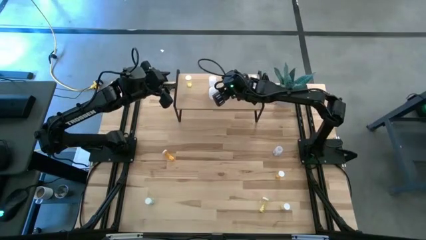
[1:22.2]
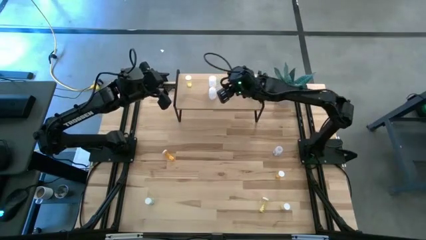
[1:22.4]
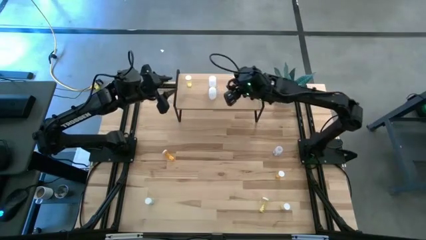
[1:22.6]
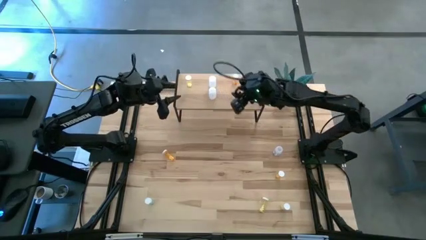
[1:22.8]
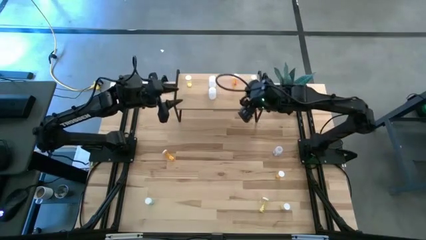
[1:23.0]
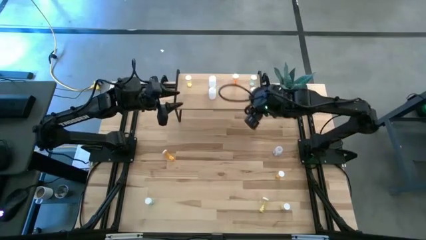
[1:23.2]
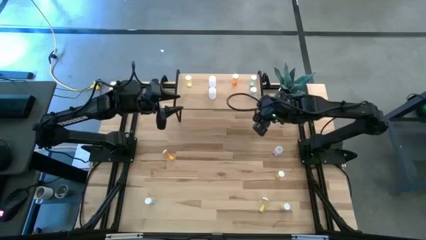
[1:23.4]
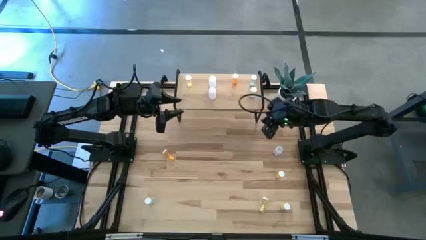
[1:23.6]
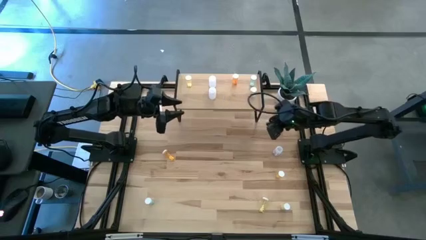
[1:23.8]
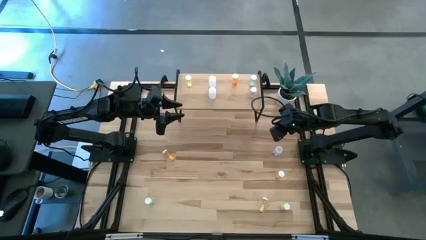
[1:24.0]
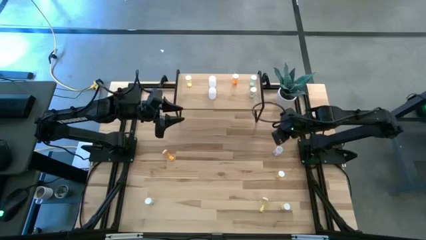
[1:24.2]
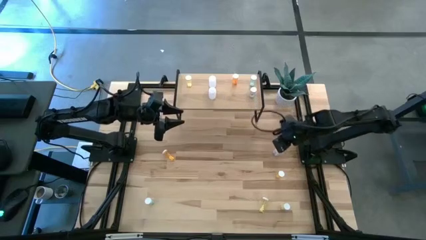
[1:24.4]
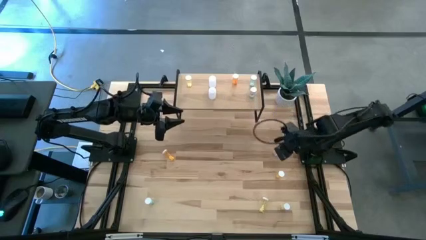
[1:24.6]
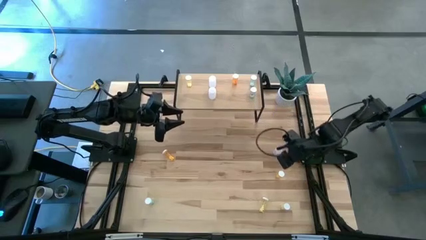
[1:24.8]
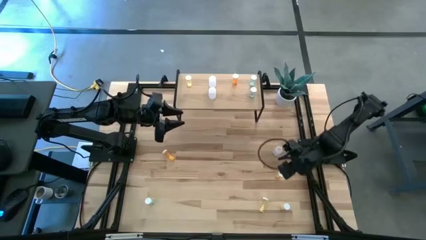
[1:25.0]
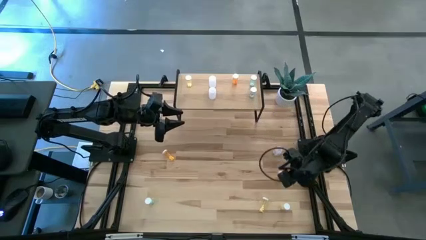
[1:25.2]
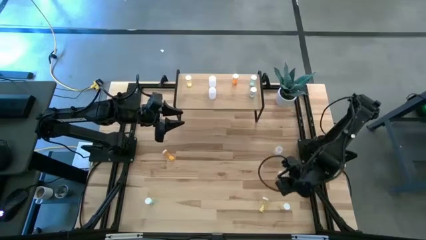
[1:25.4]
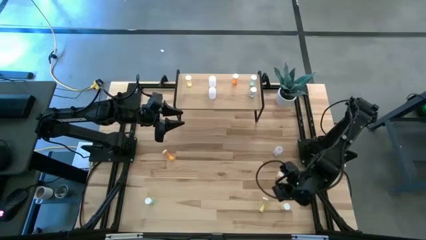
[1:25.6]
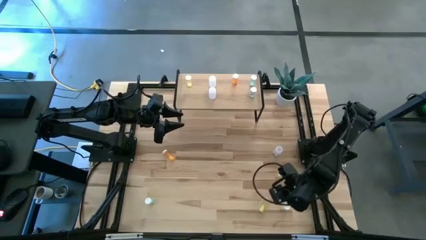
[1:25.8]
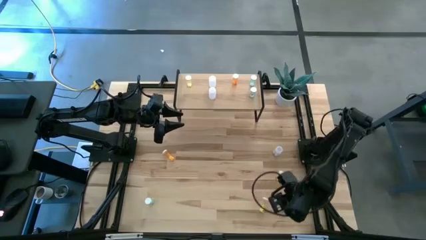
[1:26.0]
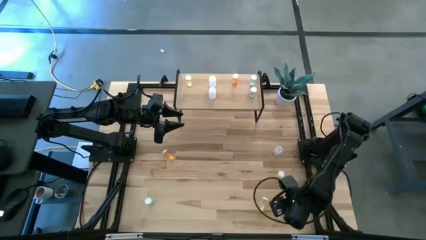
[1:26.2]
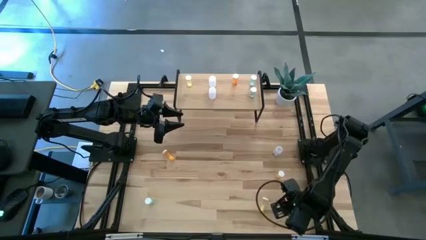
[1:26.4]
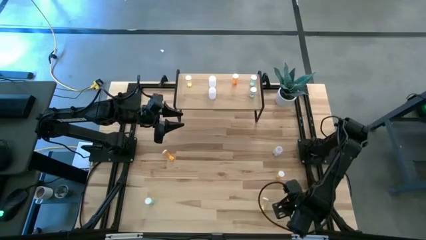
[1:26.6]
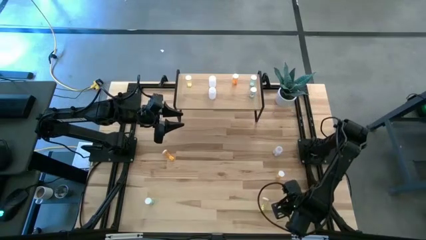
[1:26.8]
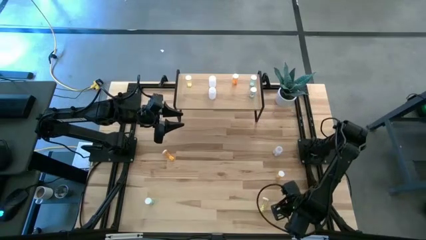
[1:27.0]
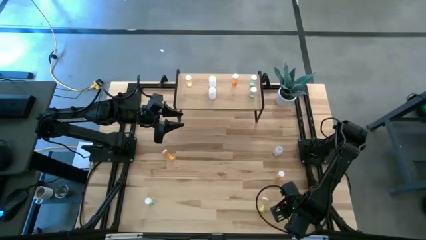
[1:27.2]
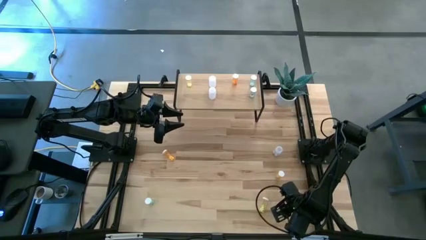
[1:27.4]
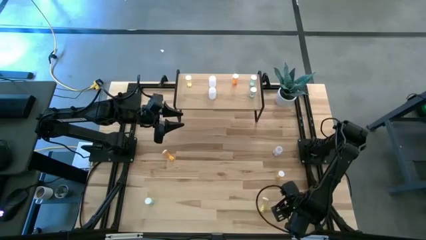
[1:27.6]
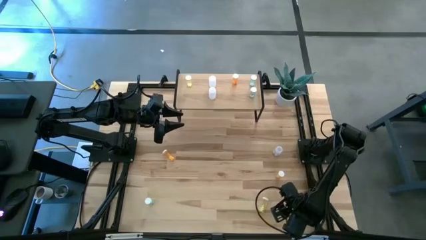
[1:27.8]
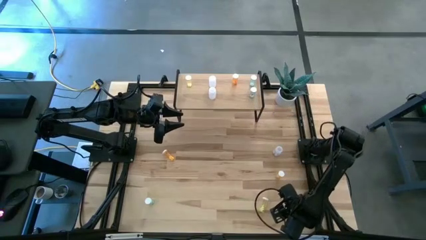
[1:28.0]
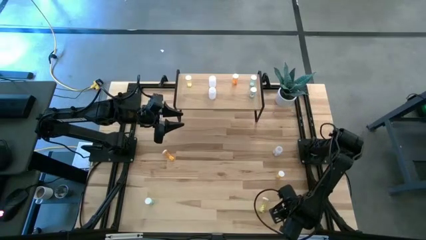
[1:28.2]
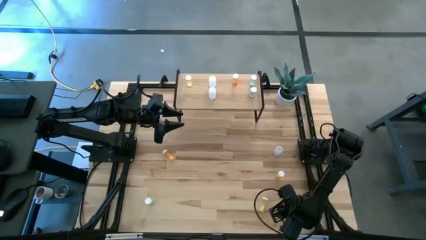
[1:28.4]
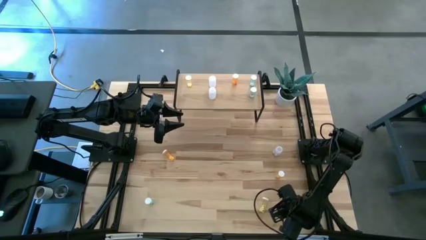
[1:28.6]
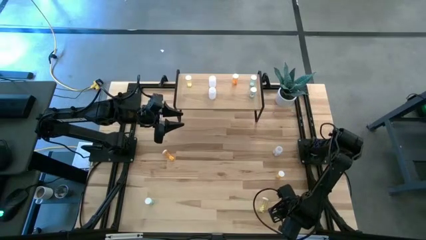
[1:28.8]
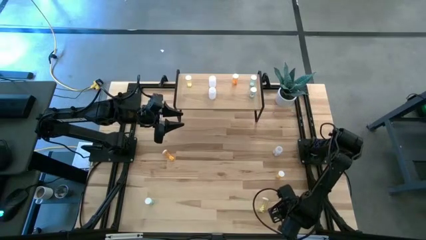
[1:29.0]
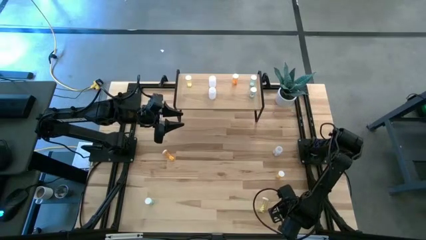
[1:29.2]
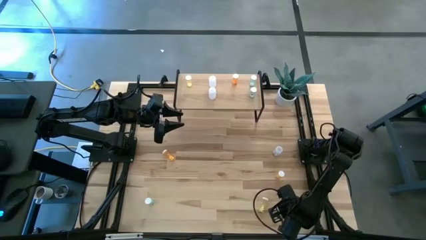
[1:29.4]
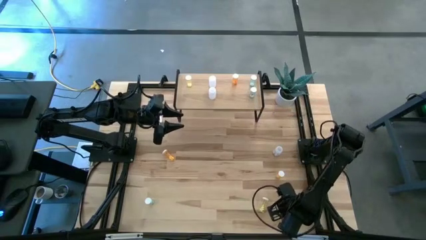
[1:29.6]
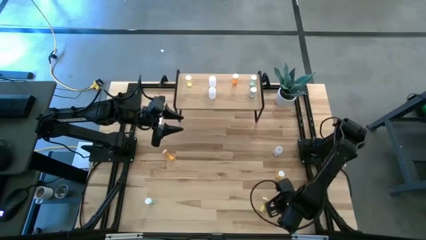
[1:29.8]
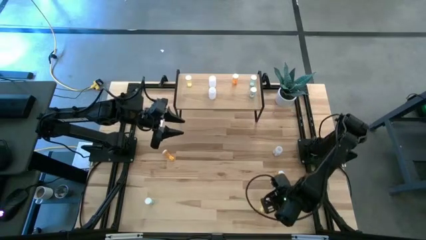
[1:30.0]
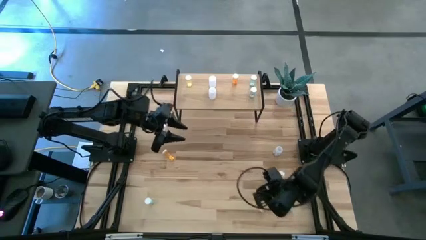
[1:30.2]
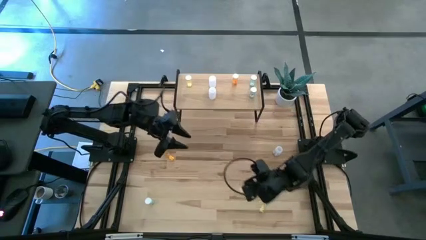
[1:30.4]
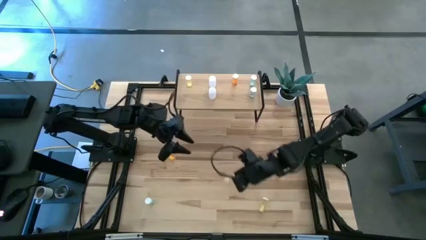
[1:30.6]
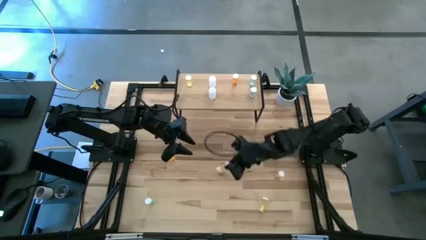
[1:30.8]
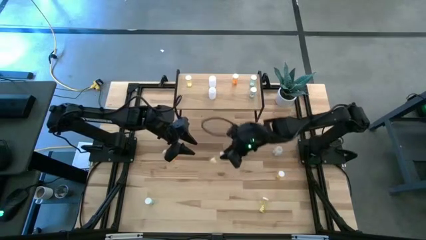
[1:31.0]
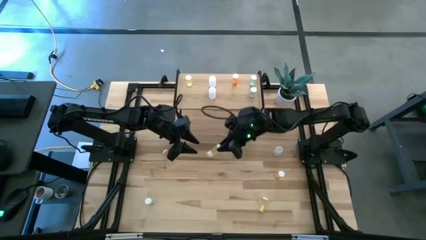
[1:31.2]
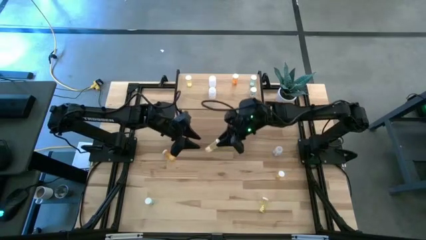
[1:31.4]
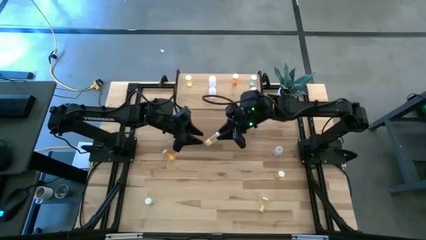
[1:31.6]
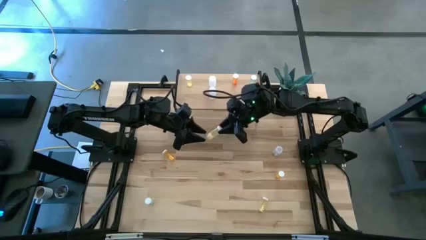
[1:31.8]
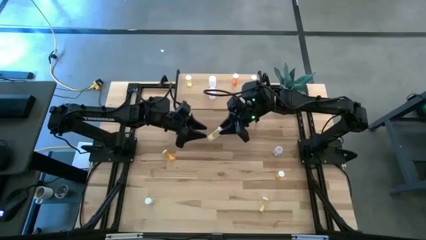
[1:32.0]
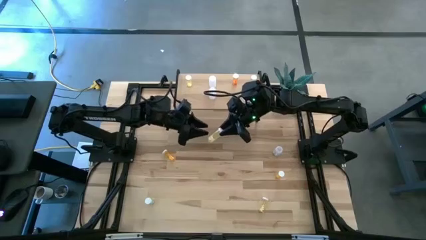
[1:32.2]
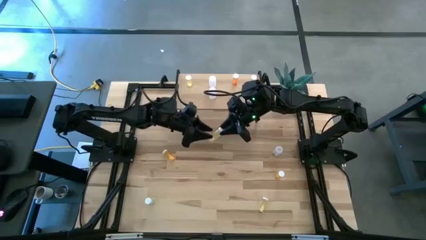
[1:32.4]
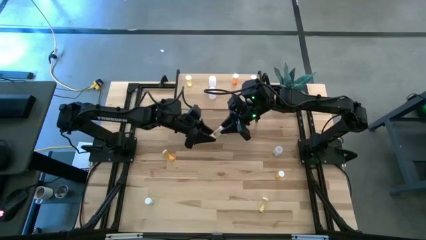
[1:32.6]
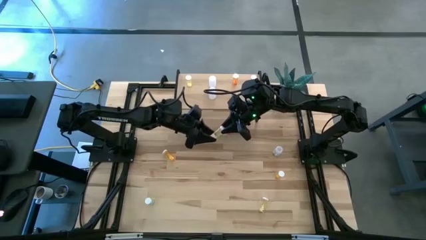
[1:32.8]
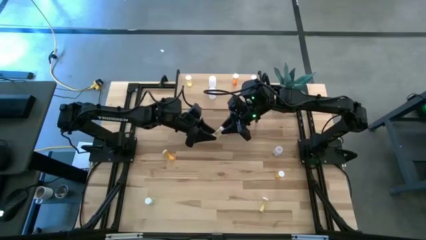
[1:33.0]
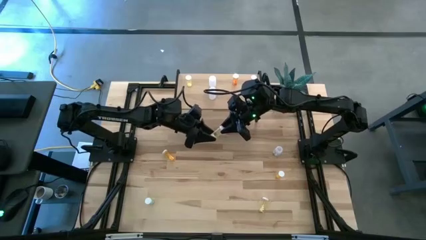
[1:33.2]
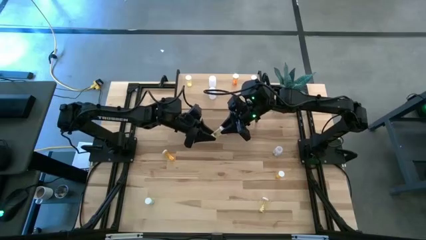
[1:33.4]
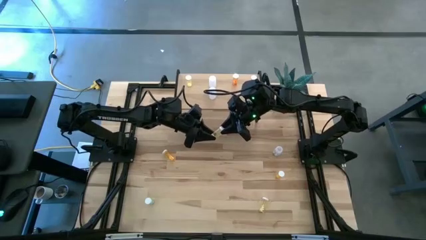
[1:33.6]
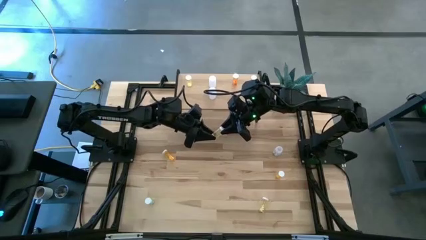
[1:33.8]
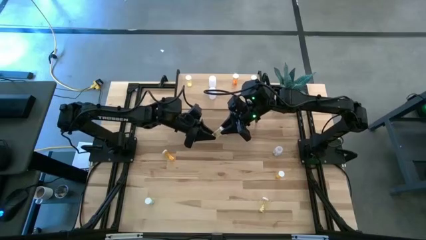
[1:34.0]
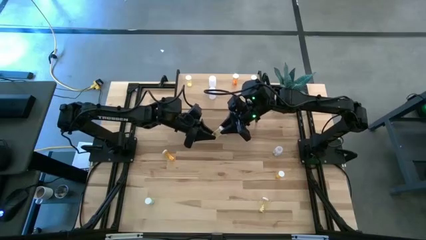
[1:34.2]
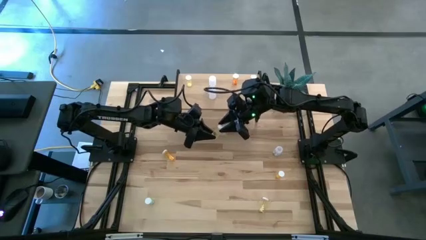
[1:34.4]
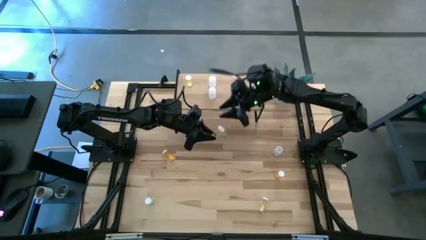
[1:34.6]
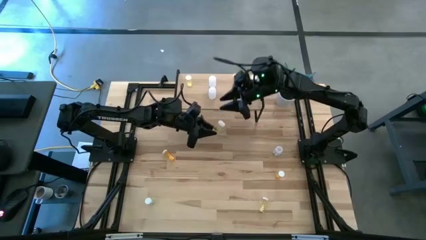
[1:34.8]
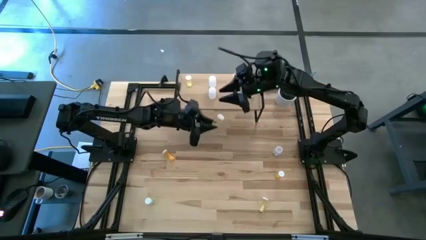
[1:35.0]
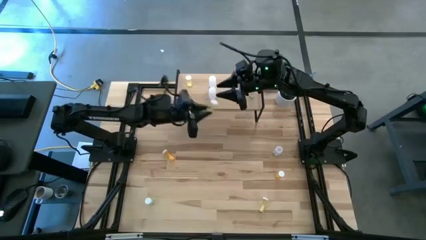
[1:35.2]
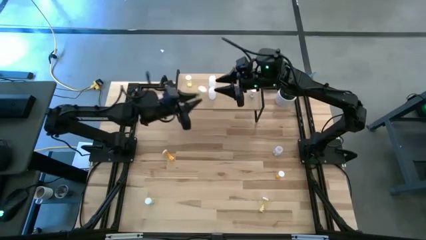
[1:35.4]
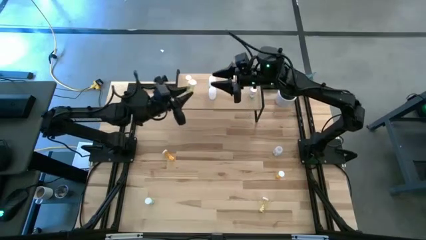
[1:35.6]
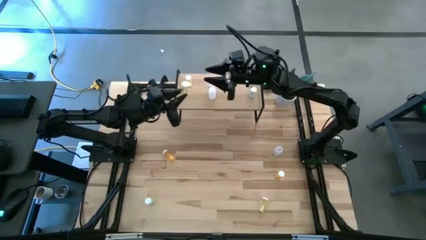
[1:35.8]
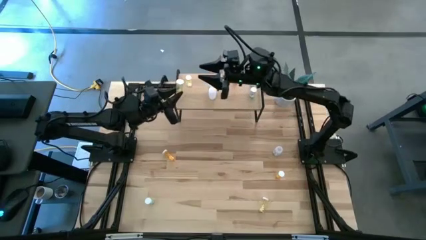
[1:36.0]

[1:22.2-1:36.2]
Task: Pick and place medicine bottles onto shelf by color
Put the right yellow medicine bottle on the shelf aligned with the other yellow medicine bottle

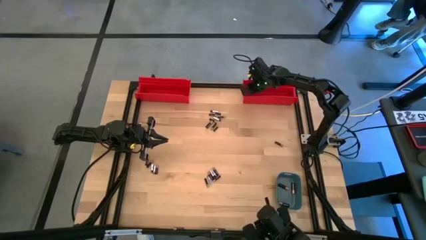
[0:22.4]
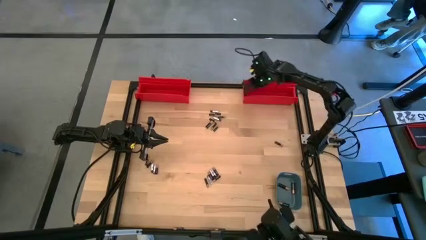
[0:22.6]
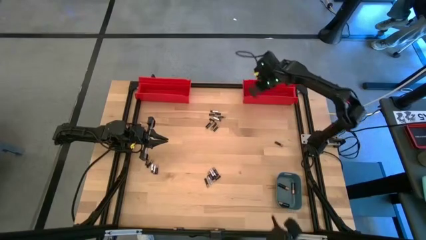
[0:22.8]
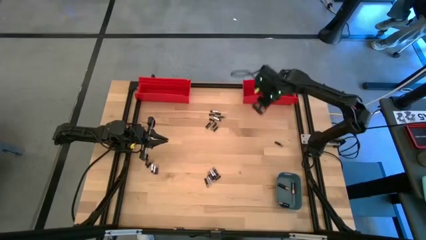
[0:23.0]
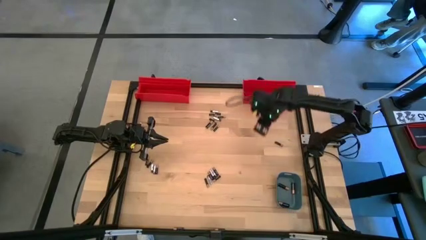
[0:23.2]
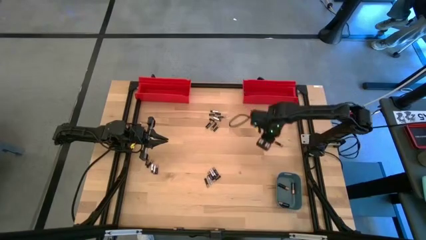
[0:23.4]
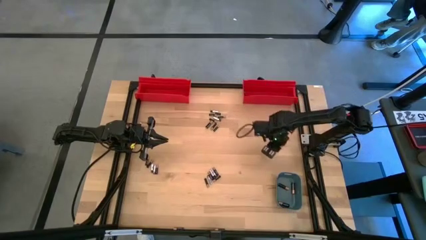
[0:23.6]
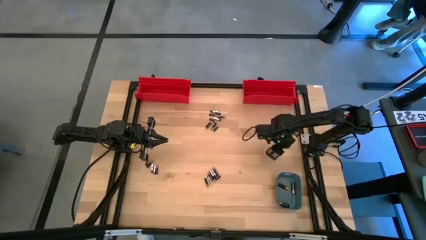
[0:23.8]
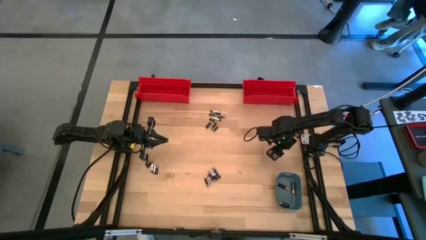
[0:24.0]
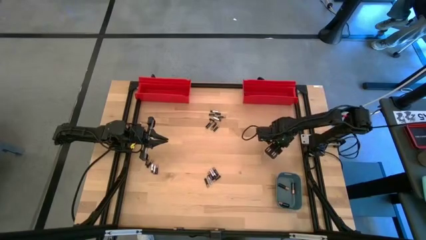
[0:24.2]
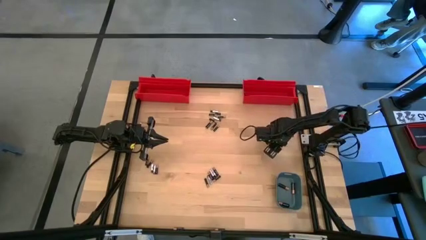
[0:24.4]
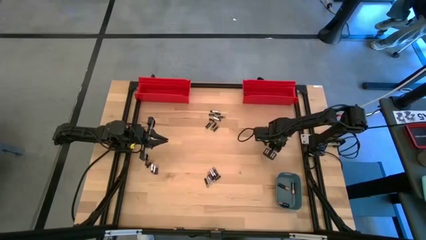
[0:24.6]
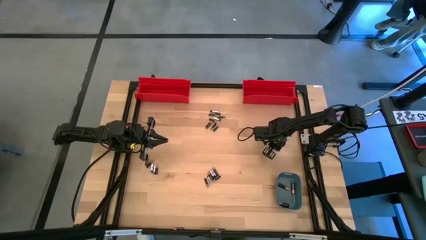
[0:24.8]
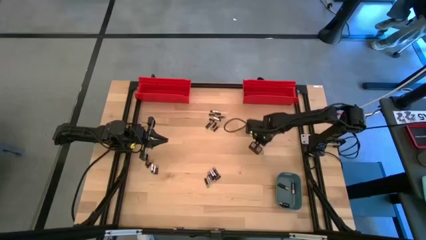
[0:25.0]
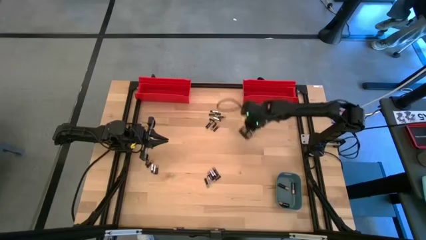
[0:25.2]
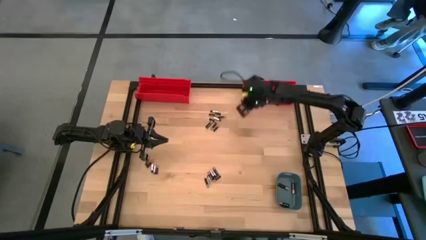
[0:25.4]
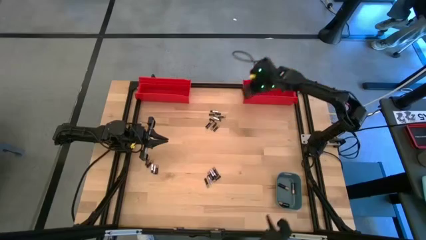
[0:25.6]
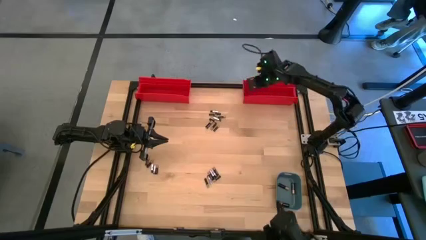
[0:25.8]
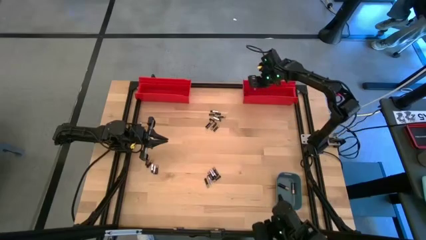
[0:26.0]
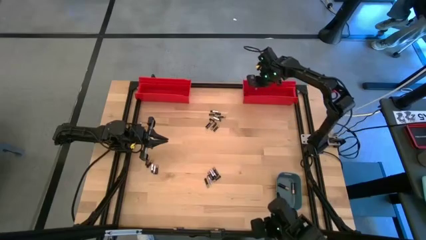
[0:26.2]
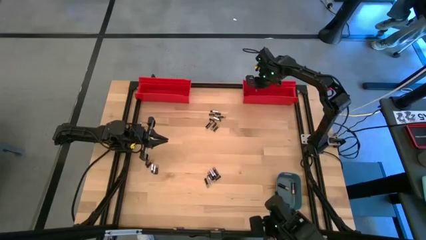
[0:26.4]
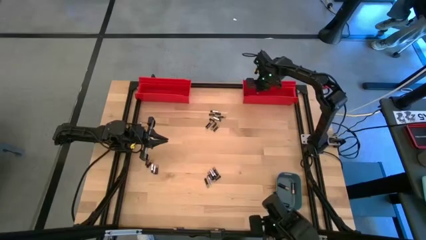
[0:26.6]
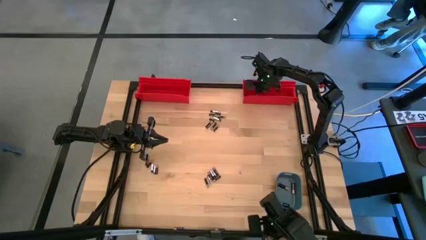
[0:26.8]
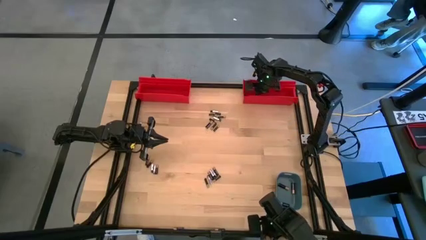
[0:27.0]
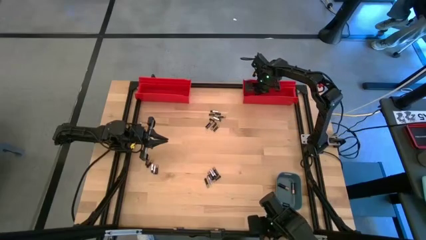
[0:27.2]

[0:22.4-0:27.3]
Task: Sort batteries
Put the small black battery into the right red bin
